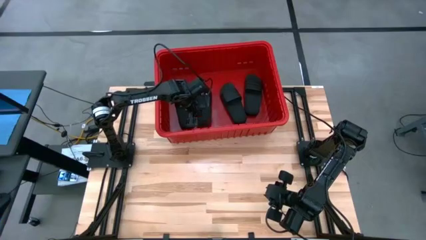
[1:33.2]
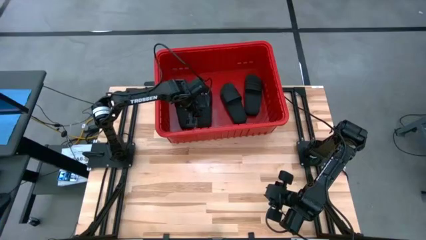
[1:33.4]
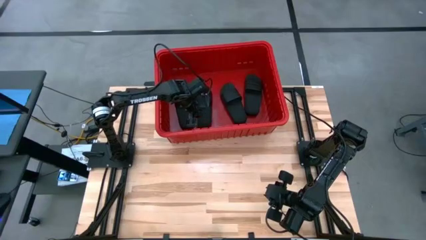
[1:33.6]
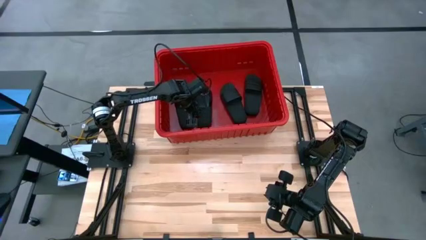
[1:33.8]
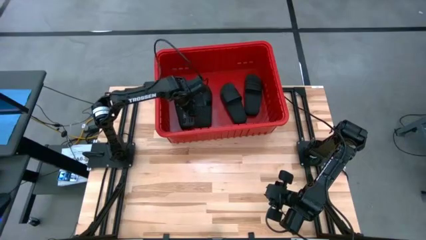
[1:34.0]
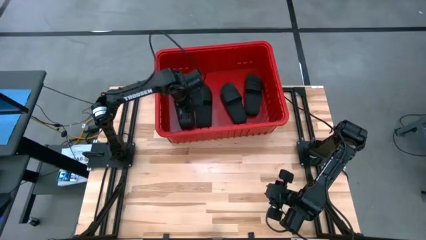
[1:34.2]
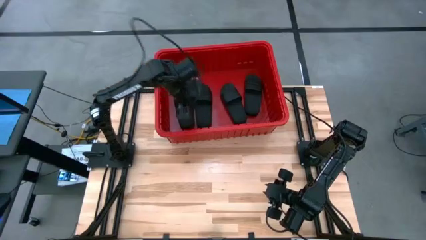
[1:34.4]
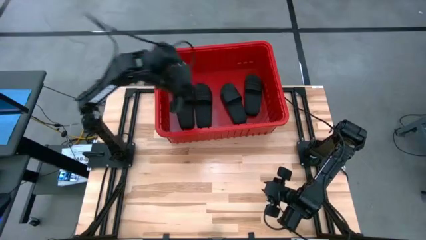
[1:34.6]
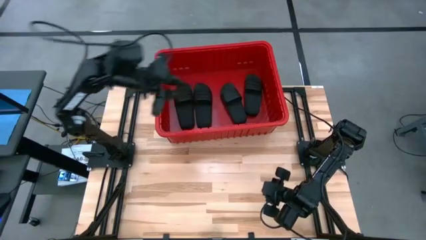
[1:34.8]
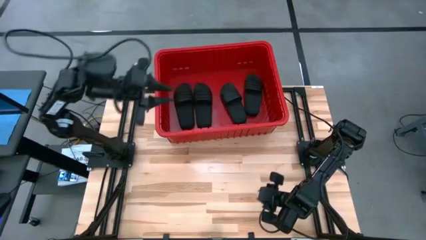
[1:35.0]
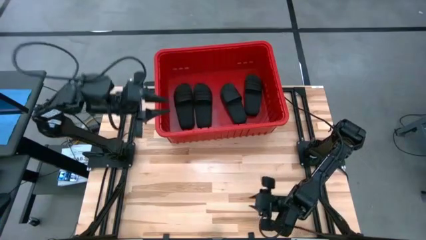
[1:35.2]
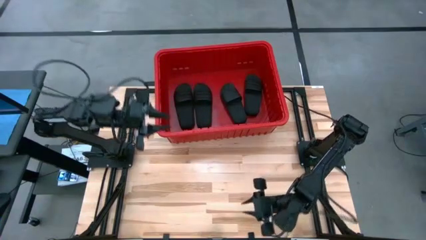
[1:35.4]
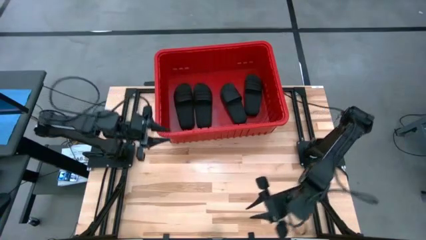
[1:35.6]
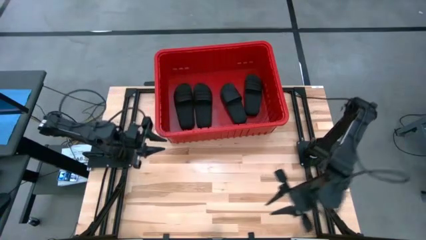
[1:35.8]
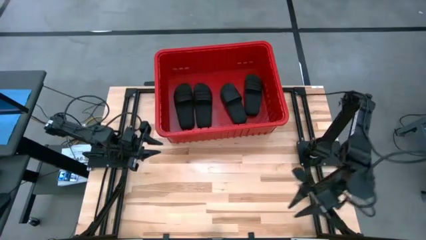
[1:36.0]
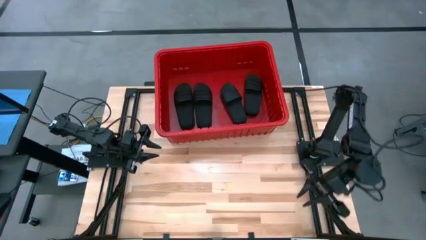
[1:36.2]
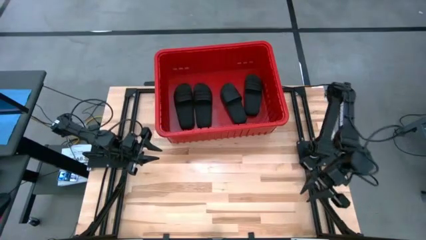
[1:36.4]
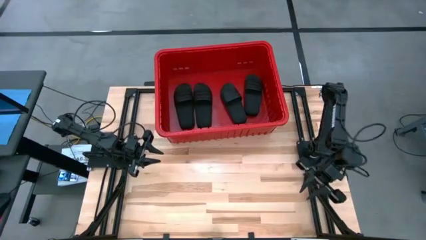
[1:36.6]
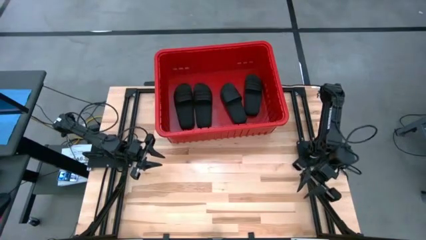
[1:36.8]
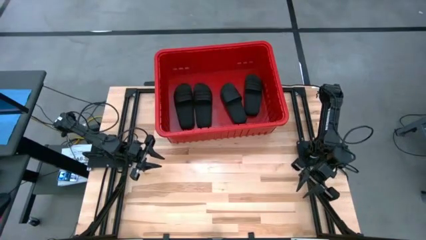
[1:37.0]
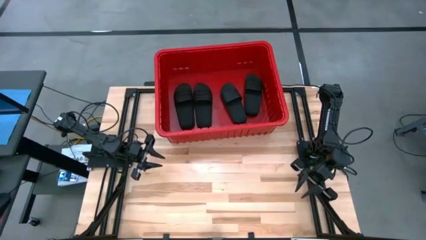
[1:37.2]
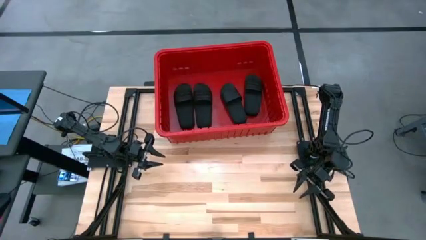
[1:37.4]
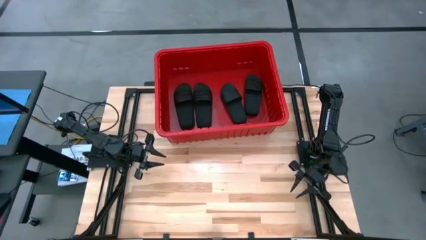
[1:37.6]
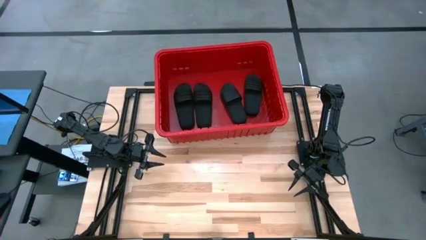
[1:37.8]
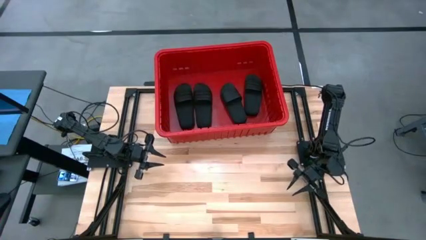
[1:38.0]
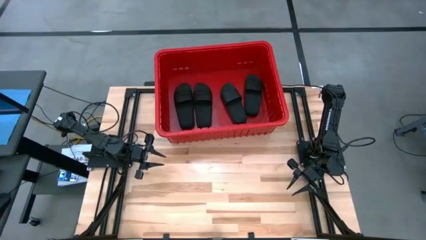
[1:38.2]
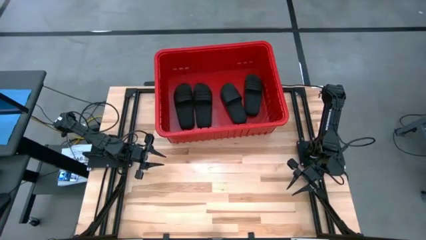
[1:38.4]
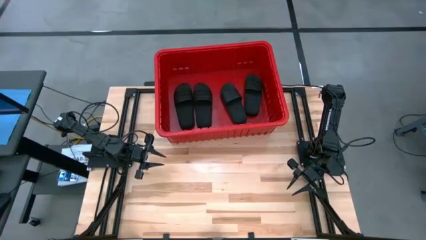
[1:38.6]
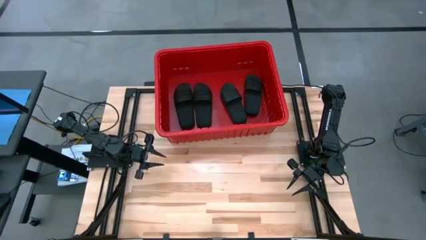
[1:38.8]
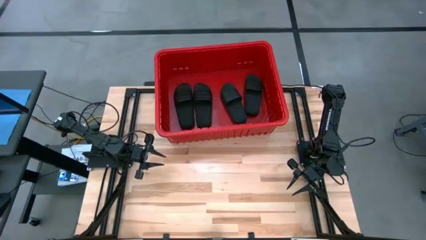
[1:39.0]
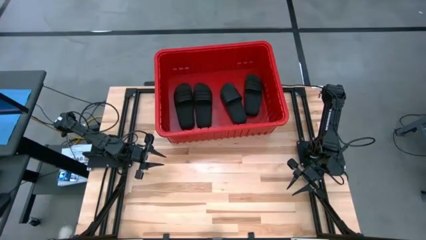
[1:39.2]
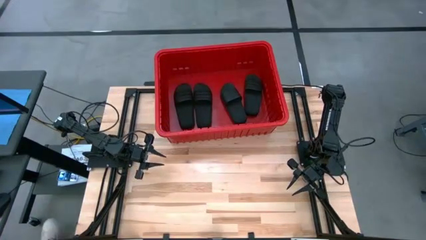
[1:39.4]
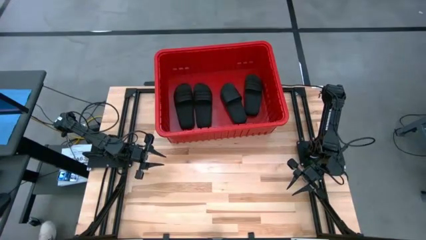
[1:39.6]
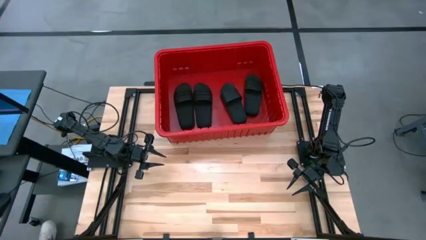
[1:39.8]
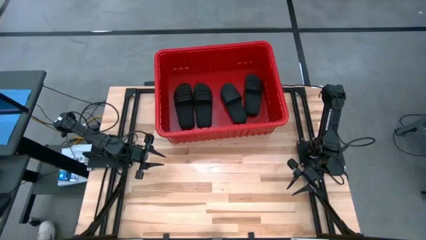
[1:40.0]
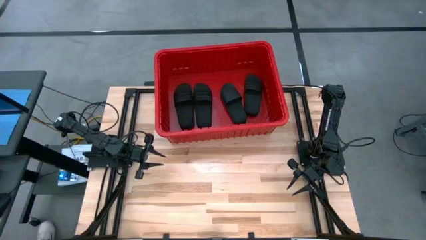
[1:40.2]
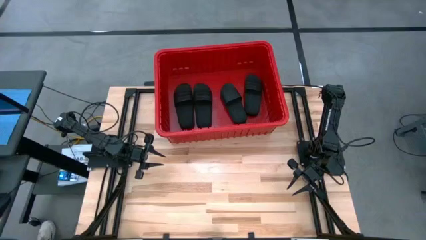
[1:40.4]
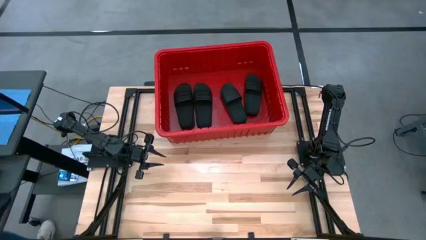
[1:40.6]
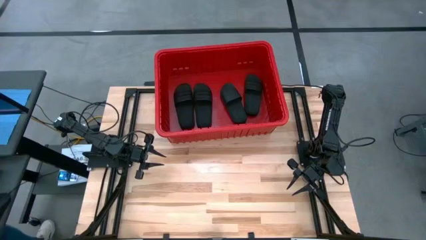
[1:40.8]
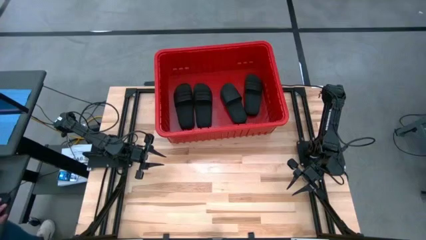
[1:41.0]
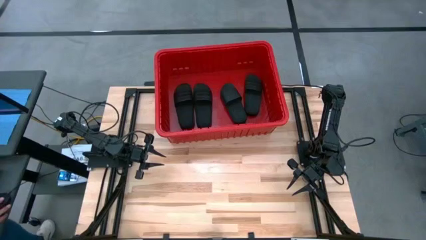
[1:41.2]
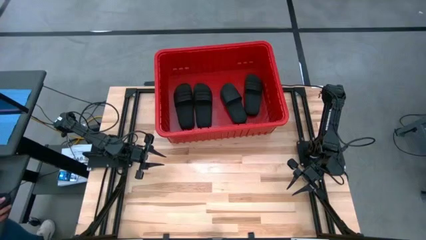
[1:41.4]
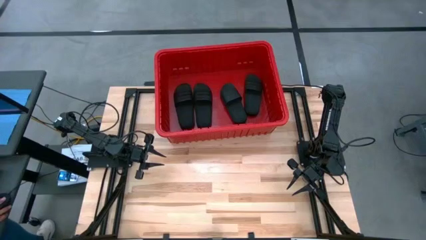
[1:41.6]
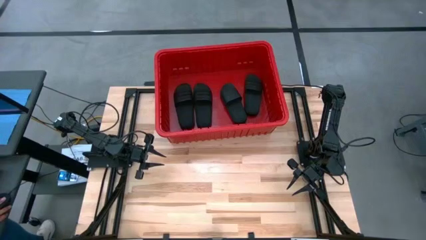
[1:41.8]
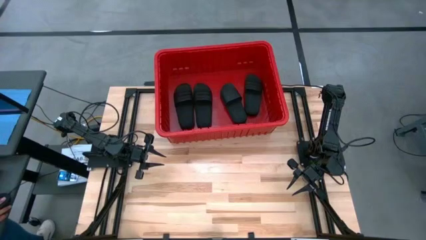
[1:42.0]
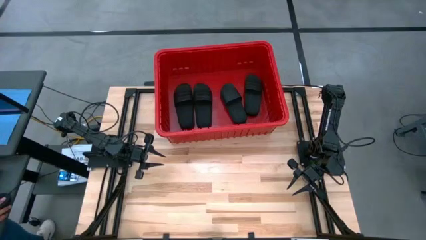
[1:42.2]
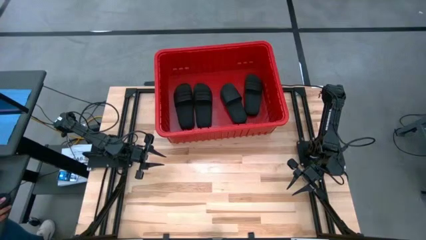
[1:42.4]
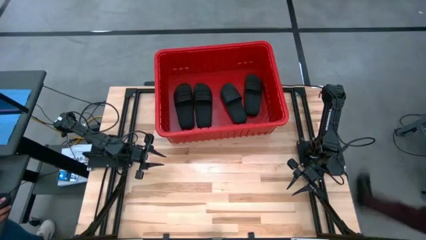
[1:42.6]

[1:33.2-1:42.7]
Task: Pick and place slides into bin
Return to Home Position

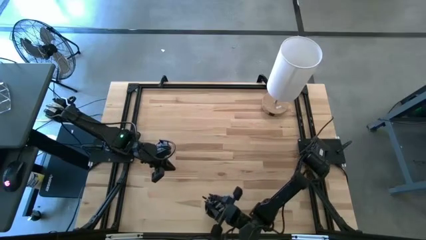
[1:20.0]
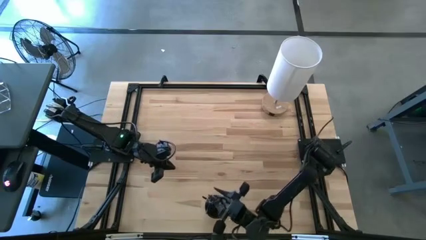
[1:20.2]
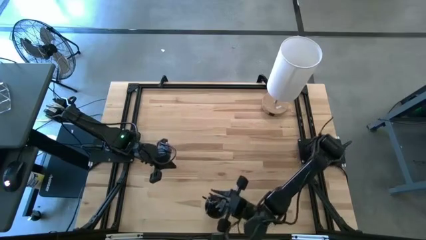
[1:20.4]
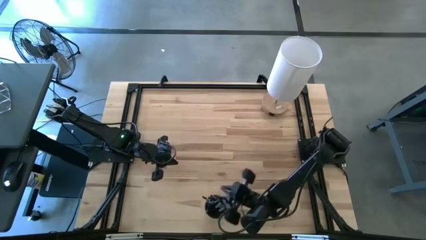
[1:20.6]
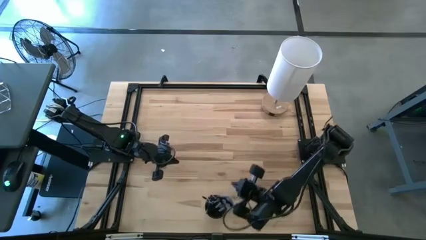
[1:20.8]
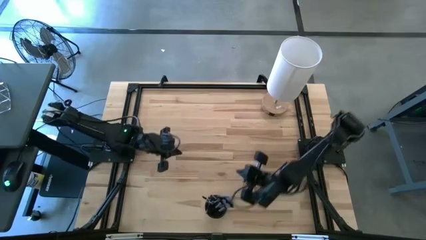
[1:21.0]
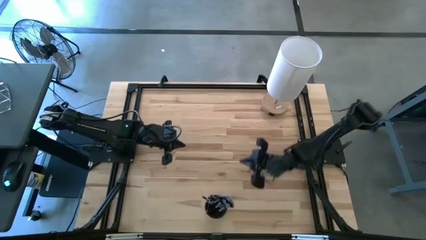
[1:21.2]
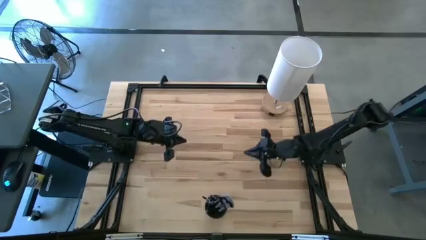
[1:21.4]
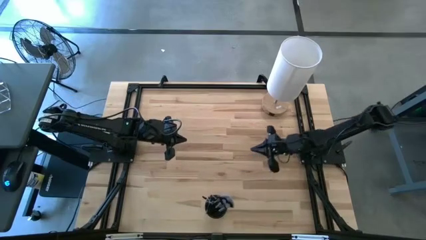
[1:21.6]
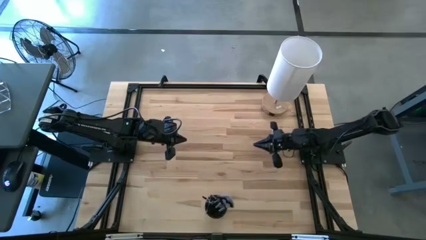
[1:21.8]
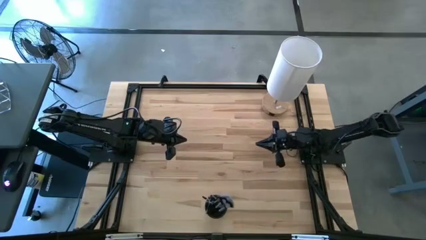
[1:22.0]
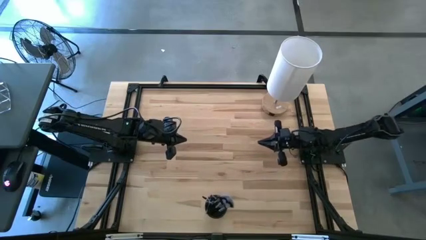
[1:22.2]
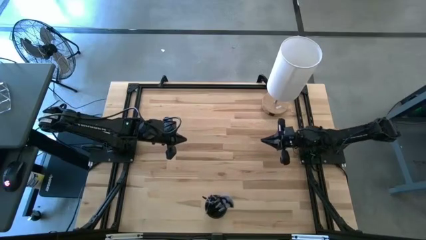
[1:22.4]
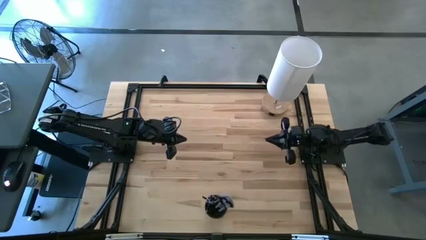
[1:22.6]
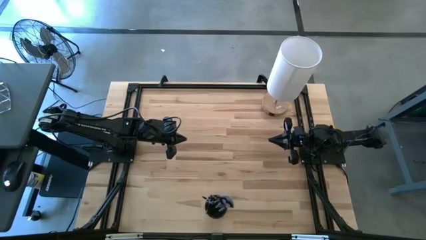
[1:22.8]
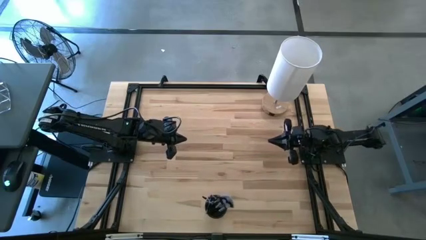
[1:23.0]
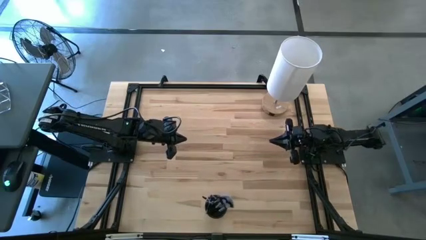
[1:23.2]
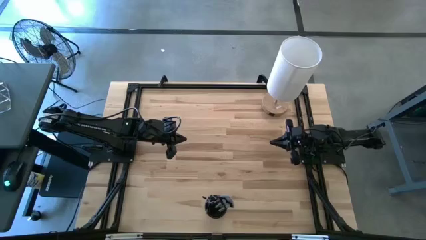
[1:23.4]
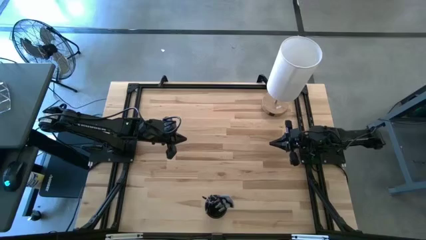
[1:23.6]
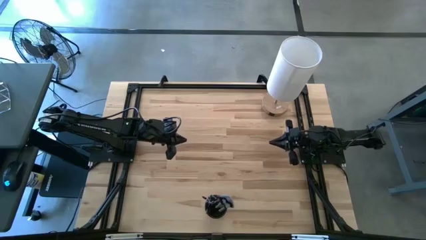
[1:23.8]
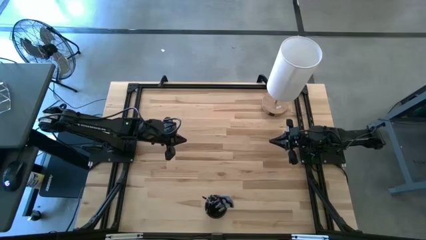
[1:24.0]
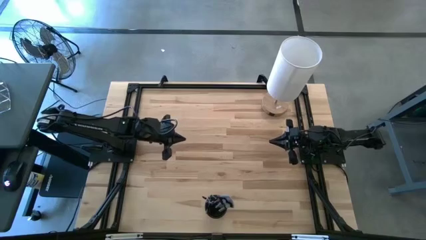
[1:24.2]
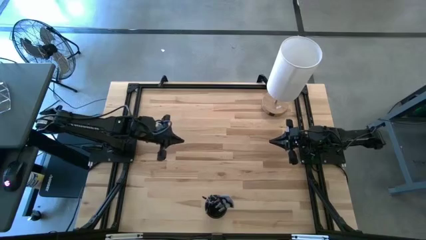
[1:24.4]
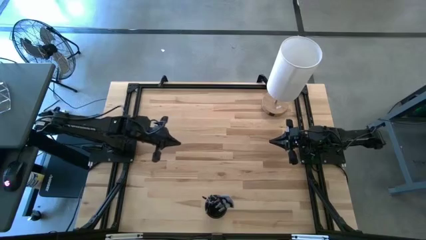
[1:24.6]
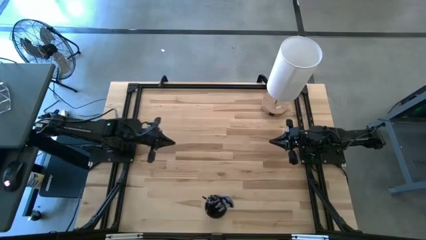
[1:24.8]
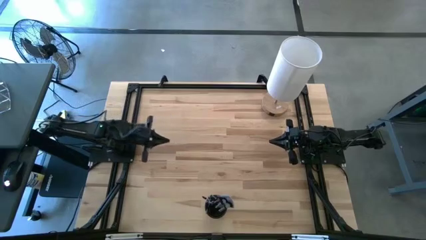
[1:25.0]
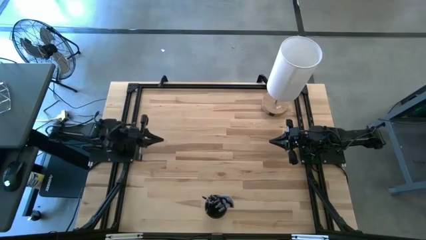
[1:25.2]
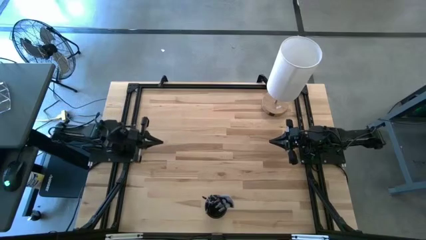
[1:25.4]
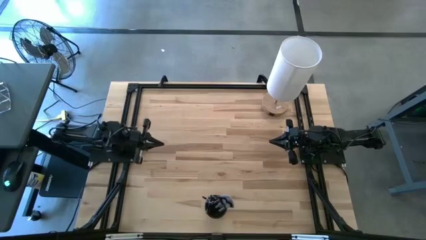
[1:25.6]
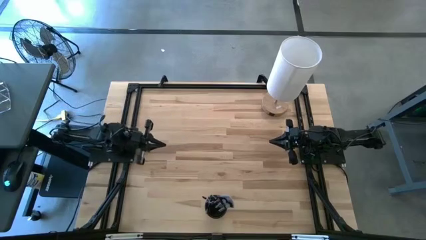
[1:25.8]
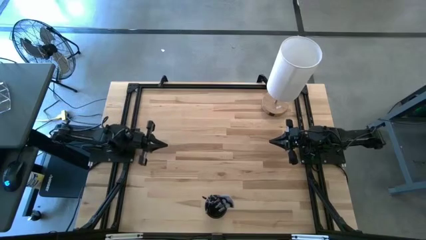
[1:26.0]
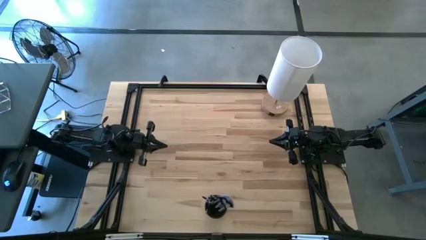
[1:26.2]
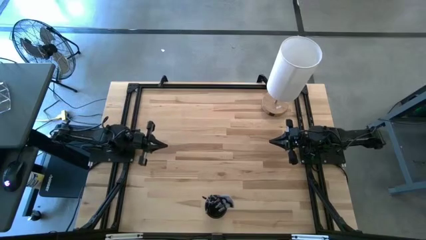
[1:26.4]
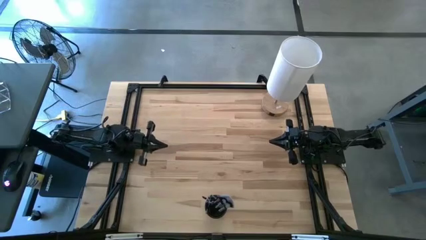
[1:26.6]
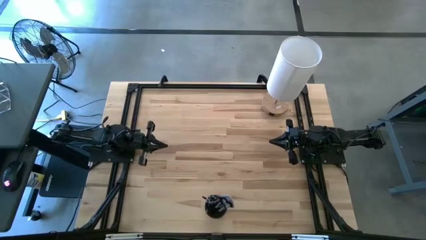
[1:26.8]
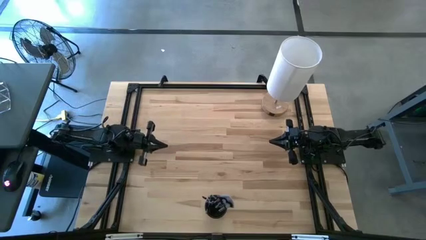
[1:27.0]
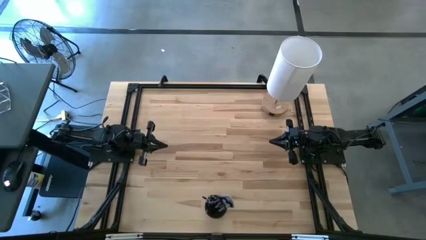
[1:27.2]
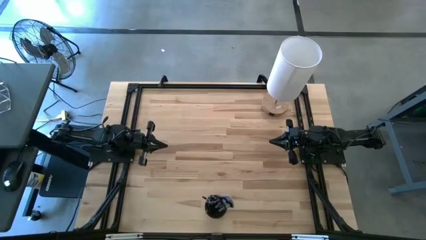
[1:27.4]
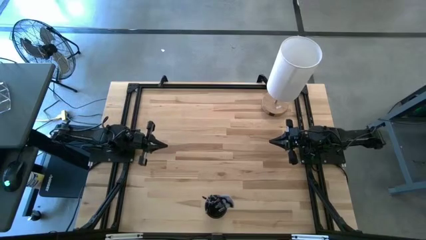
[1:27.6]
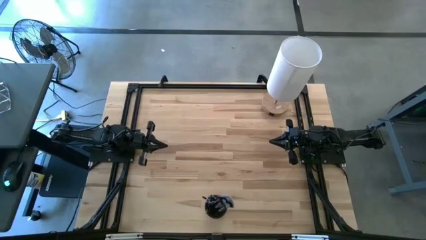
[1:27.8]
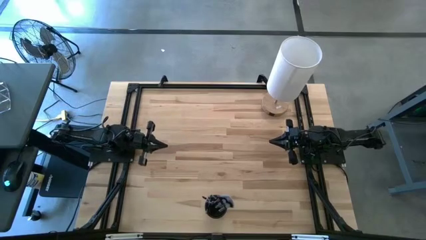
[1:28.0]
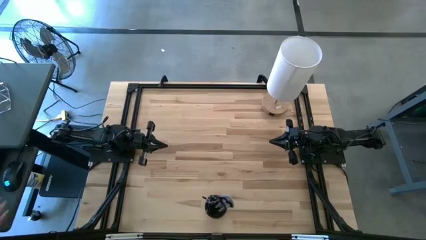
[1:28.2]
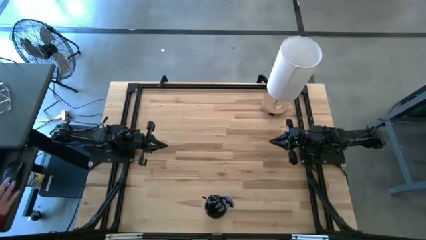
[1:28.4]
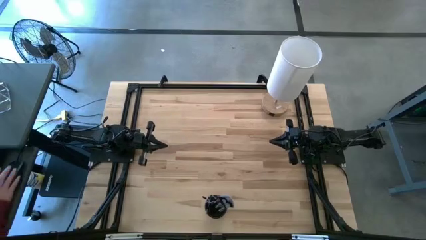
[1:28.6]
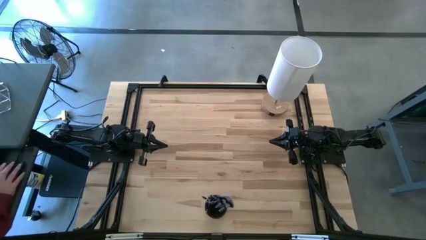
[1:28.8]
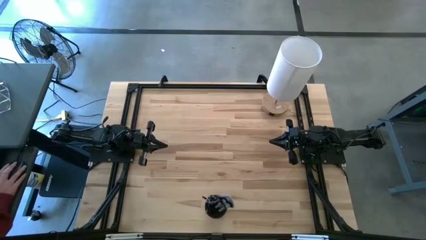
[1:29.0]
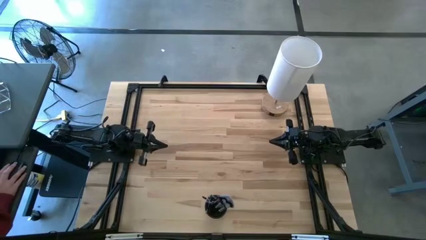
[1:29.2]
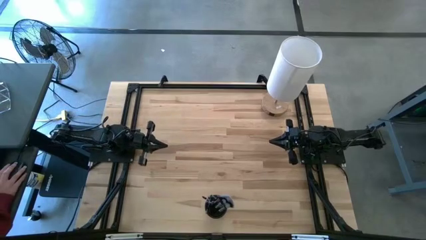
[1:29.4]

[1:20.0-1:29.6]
Task: Put items in baskets/containers
Return to Home Position
